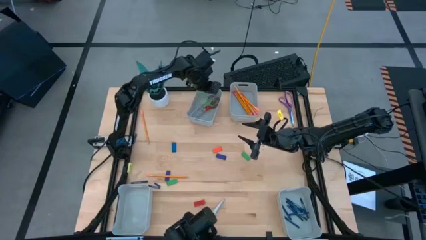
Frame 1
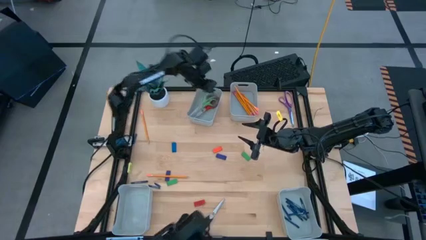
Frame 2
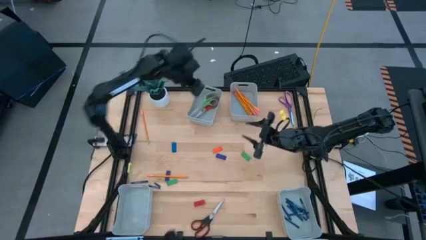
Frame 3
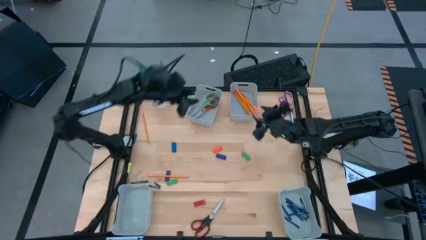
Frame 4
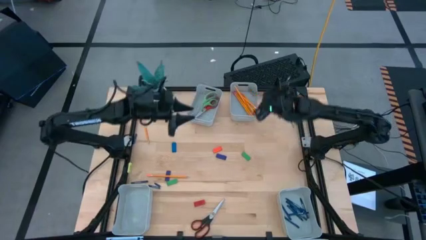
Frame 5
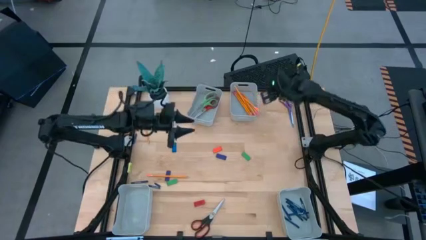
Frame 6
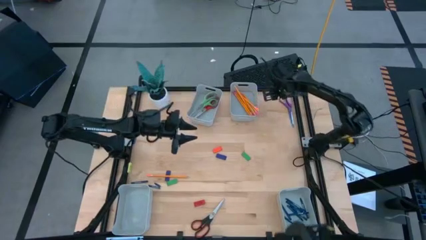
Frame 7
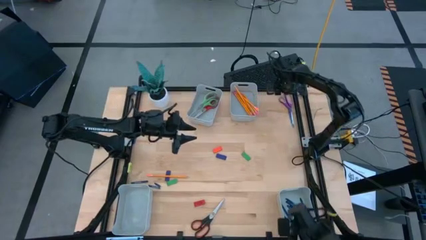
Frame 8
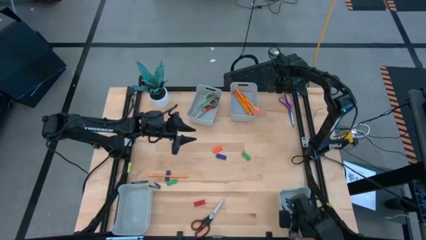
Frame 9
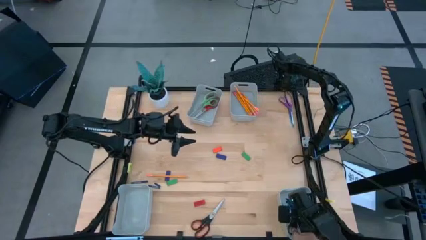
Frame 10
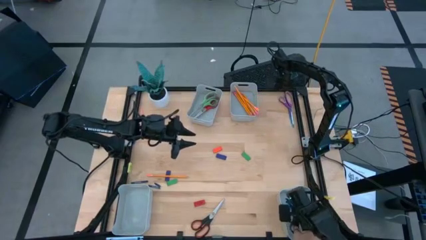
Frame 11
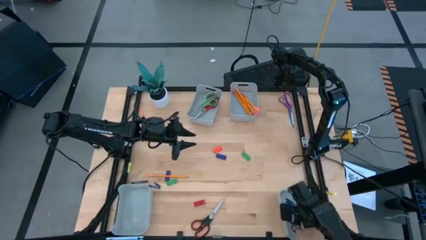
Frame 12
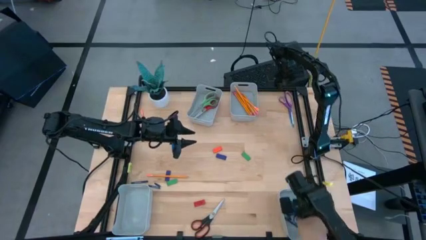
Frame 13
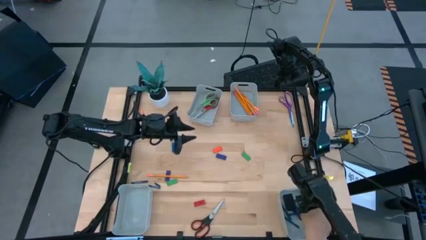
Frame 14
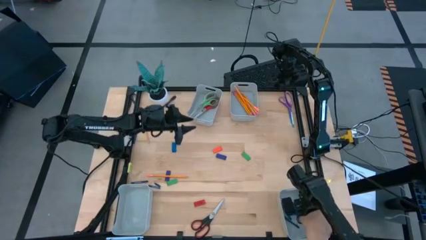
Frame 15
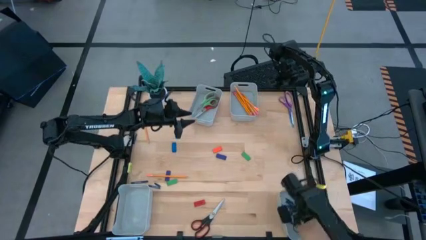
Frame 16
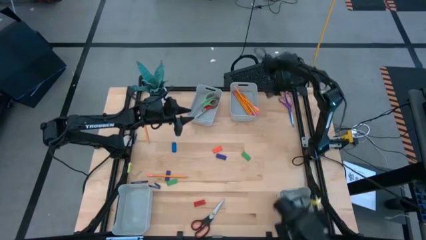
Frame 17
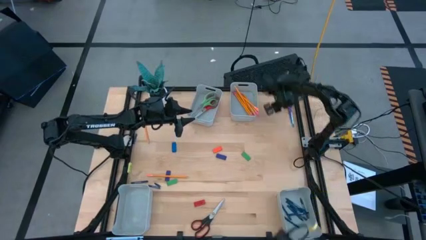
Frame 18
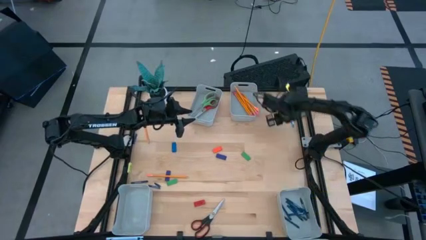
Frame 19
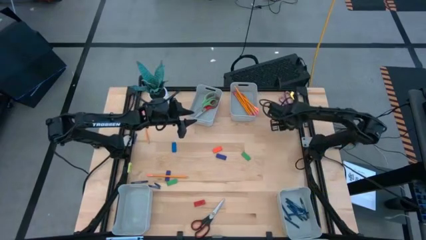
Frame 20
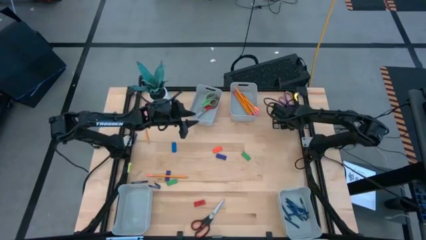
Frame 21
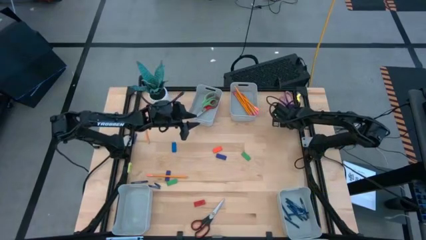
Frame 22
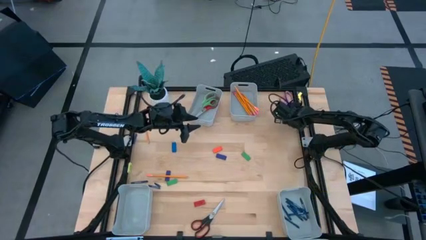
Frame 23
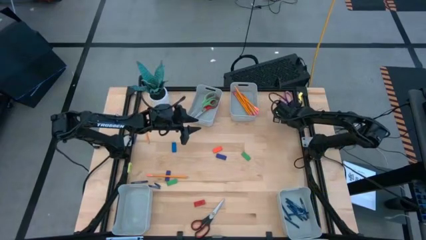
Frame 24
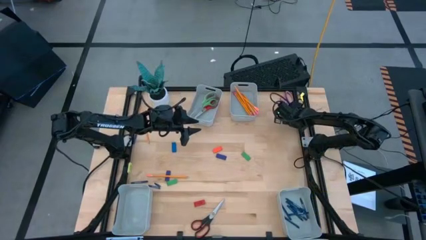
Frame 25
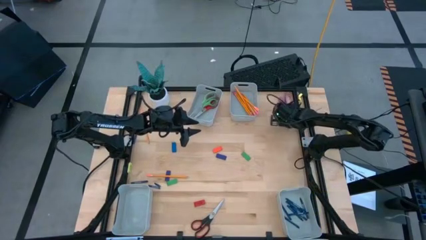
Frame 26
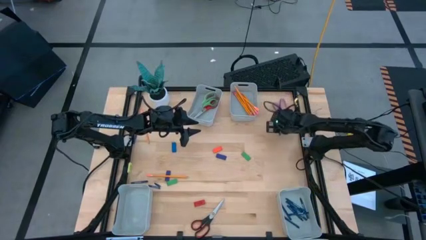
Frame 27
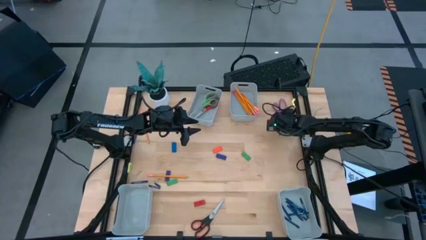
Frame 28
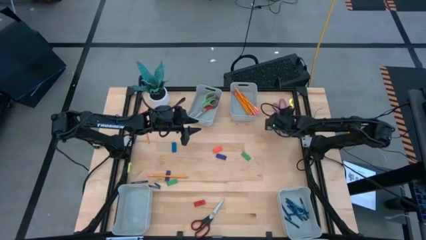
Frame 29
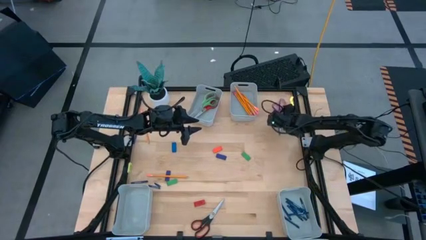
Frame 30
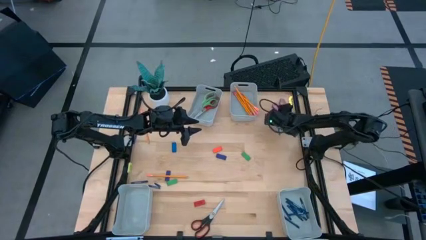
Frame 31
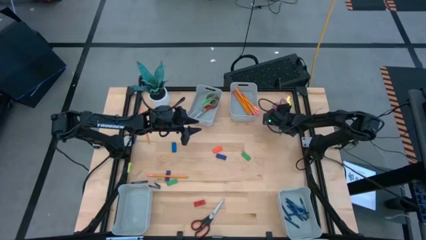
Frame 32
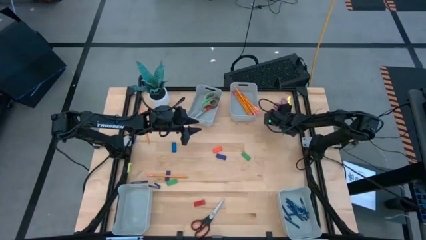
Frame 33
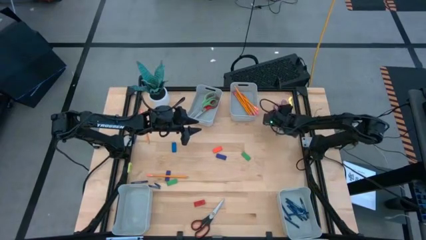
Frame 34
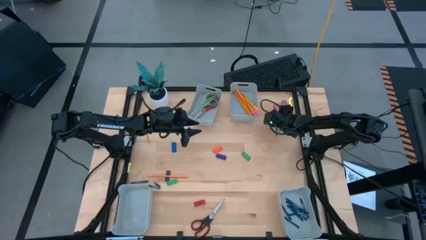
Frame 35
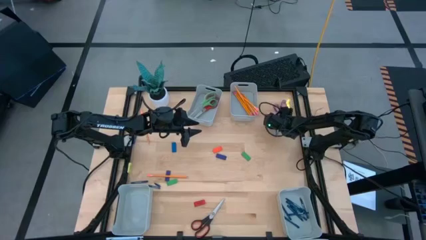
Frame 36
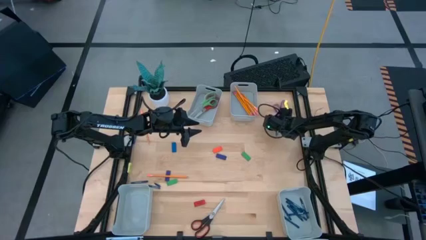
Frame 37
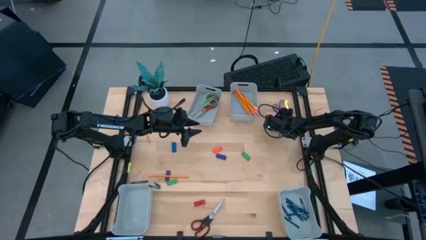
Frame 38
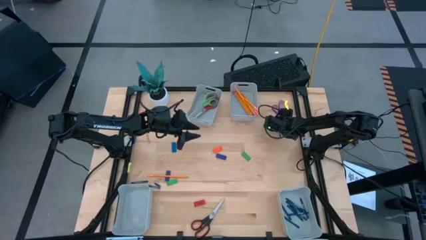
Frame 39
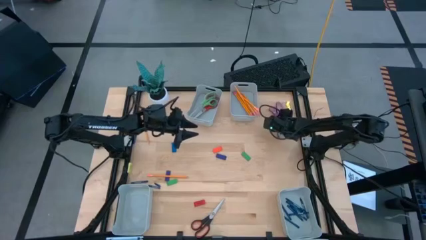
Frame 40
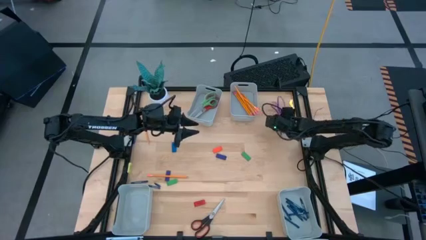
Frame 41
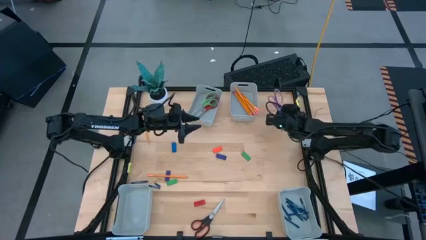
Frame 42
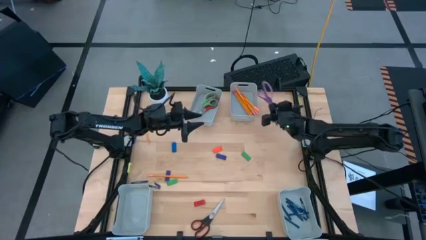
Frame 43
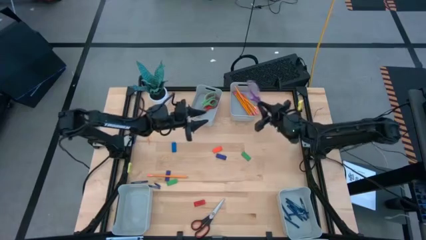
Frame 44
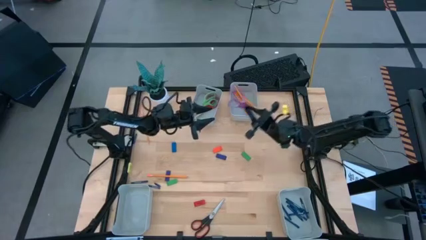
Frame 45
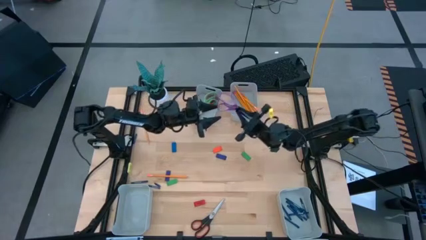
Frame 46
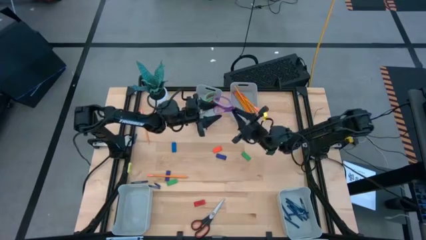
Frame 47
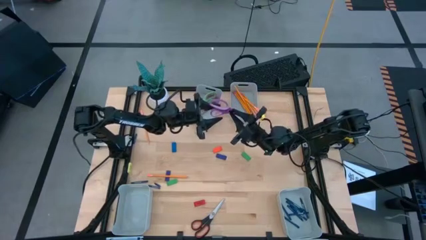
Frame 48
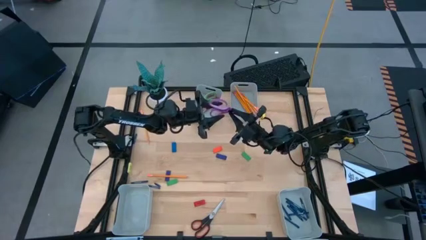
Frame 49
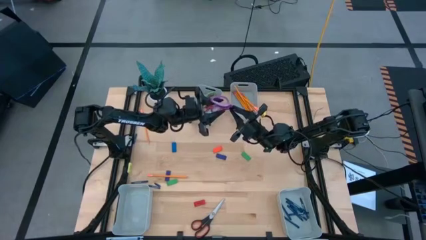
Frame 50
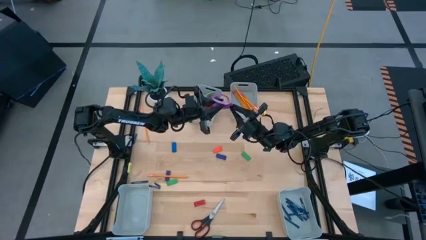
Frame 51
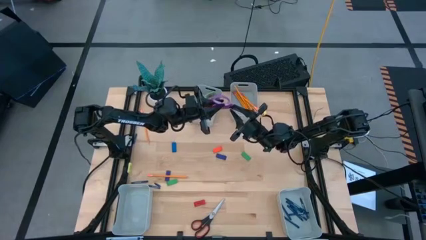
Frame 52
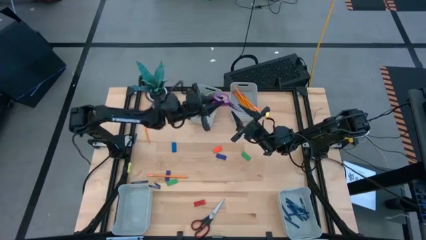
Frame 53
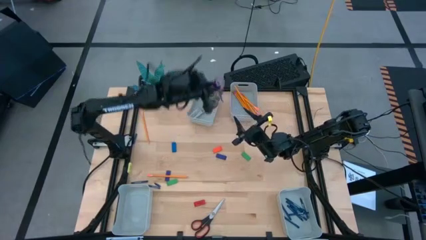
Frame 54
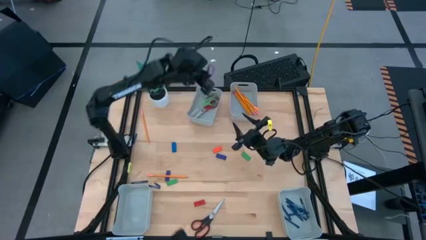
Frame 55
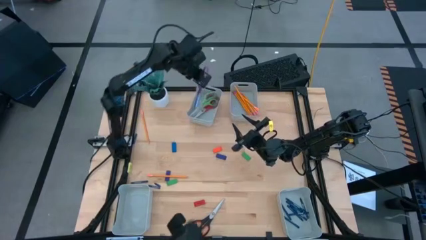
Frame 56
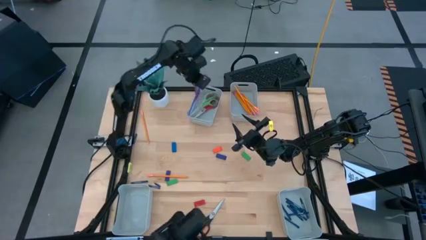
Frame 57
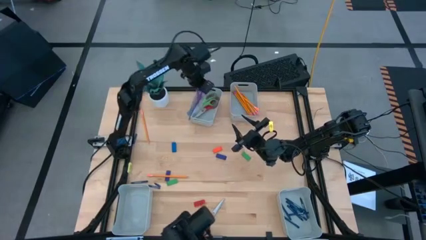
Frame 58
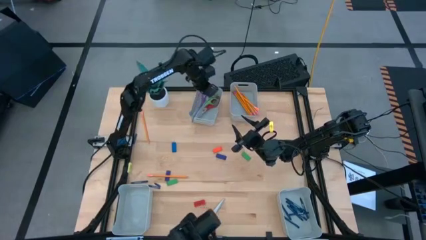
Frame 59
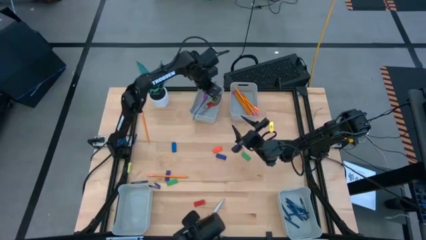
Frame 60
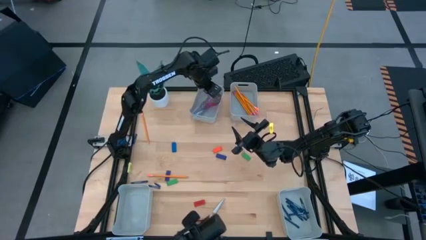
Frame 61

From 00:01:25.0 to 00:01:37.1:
Task: Sort crayons/erasers/pens/pencils in bins
Put the purple scissors into the top left bin

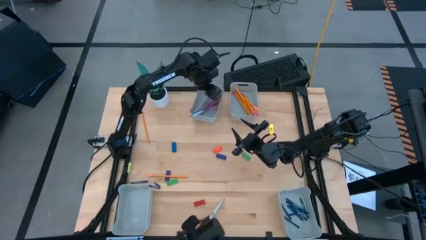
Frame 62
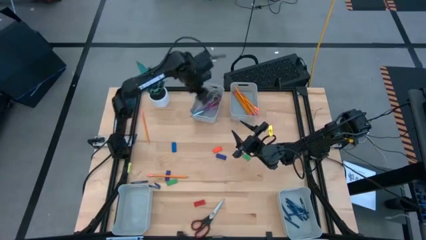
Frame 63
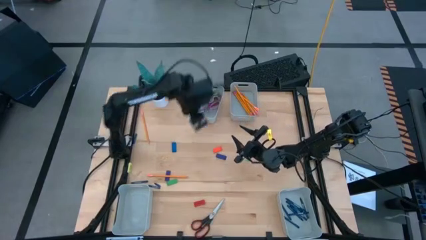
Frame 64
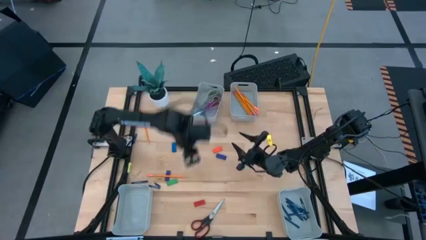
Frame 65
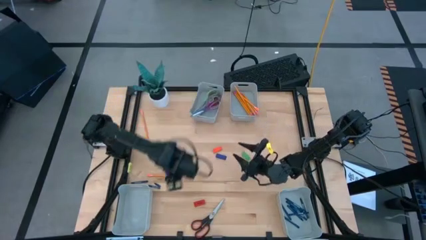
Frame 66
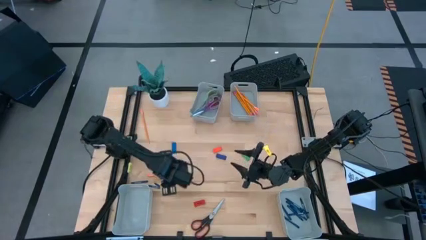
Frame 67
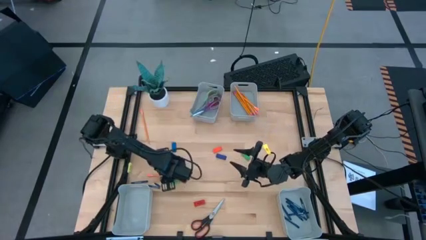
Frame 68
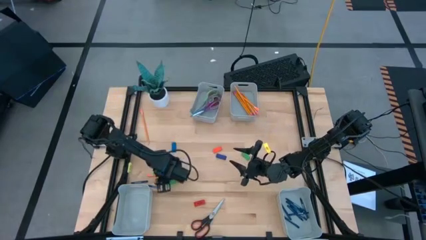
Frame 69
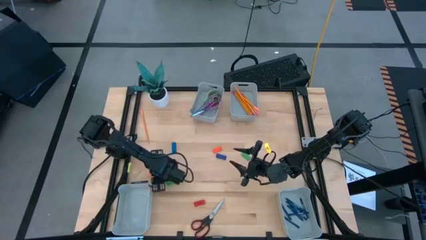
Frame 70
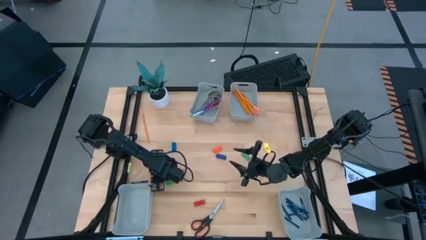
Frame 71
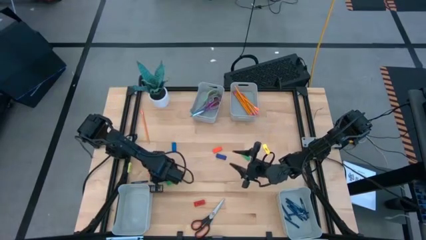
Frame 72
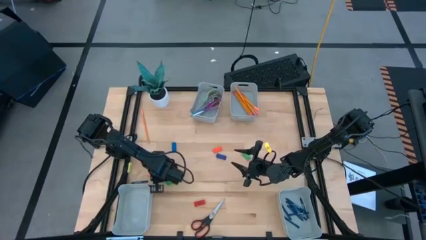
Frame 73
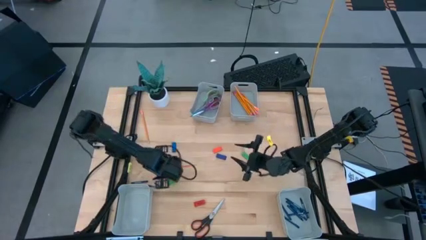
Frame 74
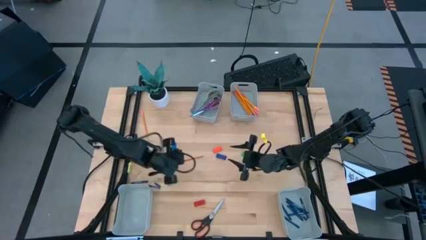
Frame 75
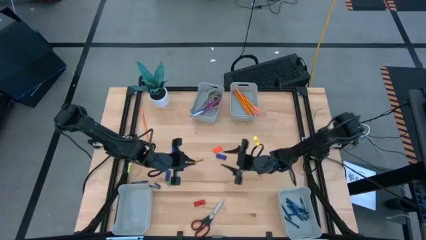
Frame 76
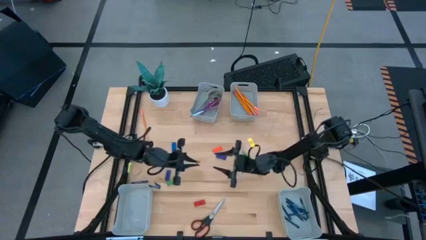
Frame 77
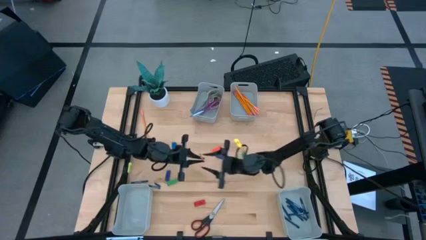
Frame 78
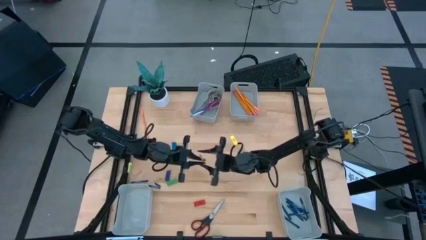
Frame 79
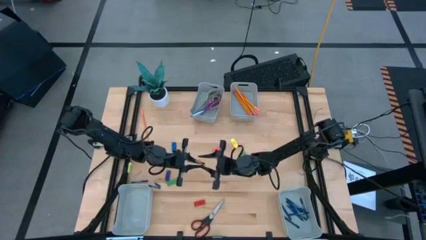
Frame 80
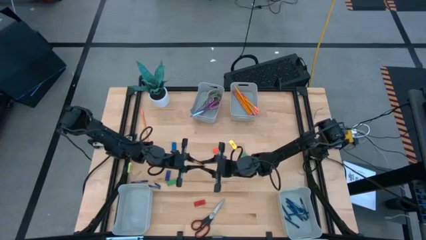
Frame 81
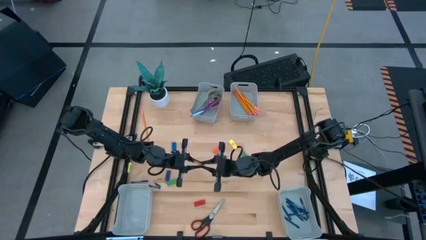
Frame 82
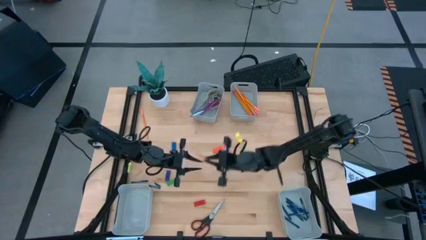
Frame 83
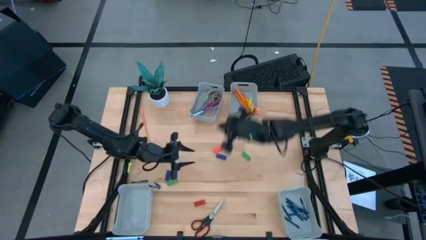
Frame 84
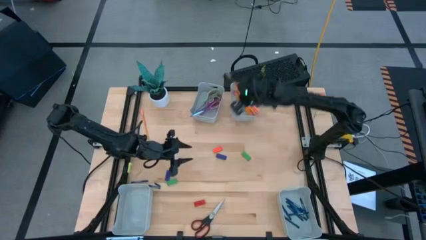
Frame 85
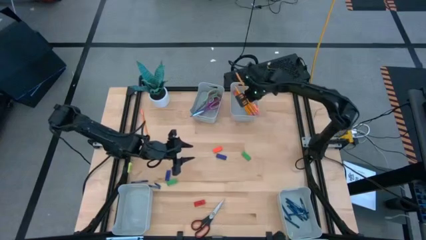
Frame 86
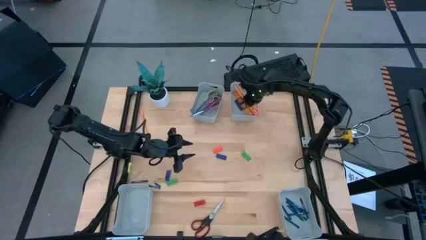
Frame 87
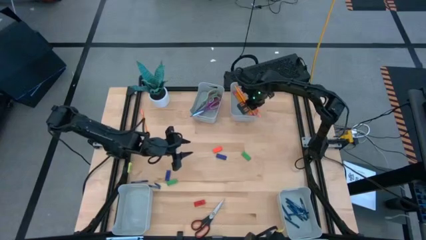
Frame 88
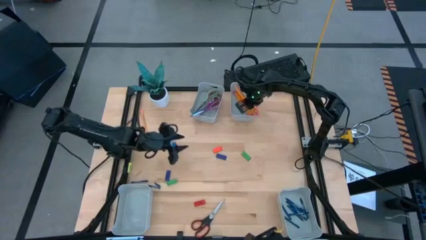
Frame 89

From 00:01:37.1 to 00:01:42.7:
Put the pencil into the top right bin
